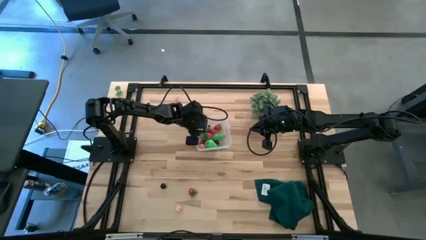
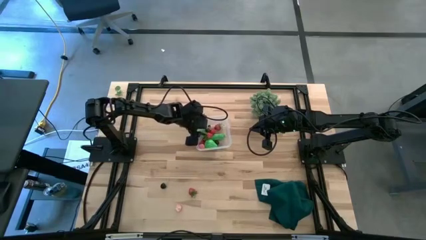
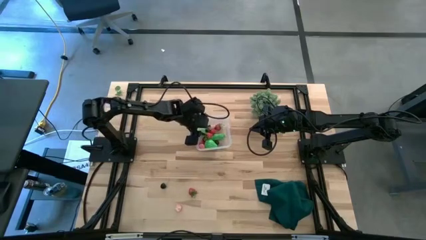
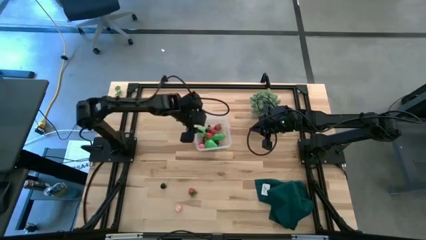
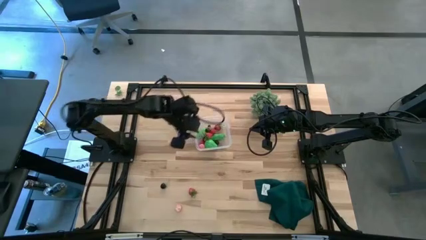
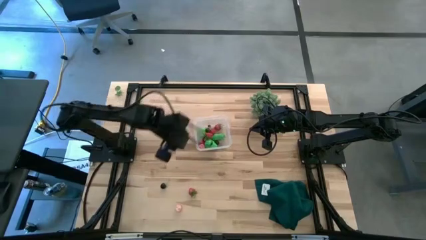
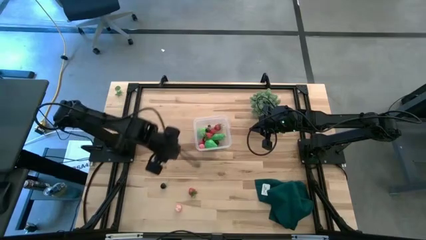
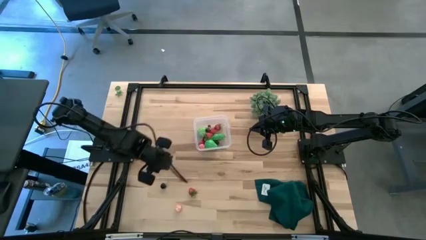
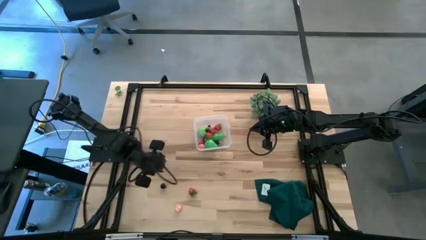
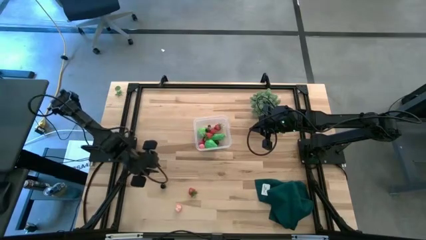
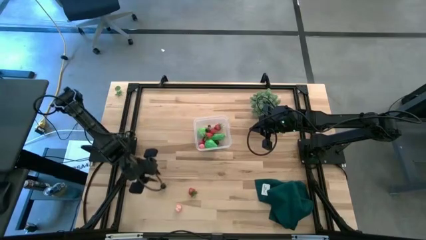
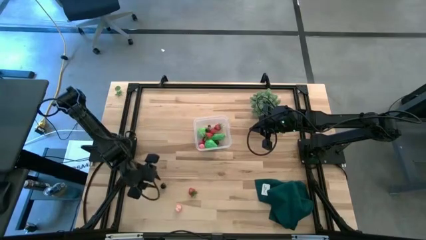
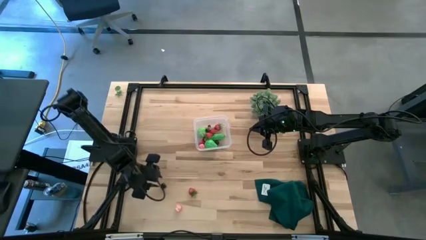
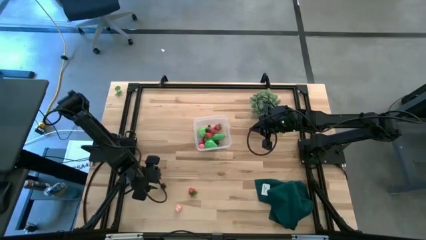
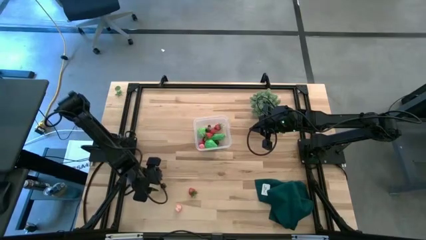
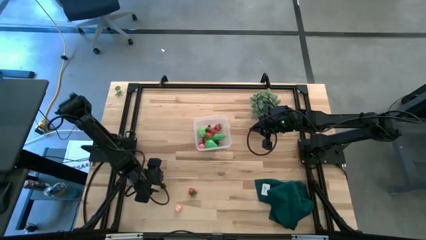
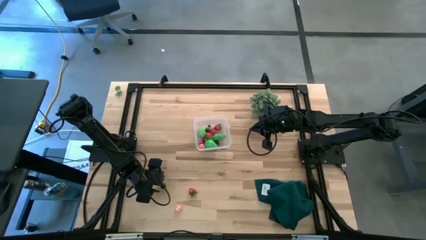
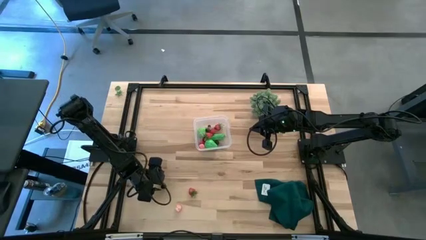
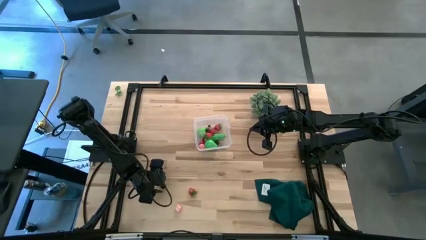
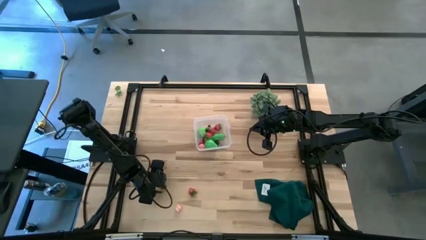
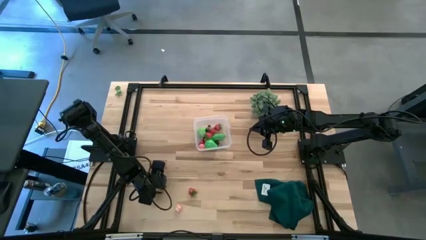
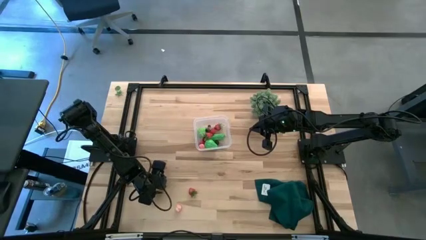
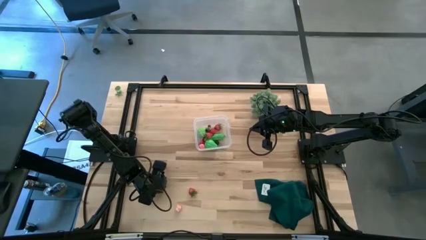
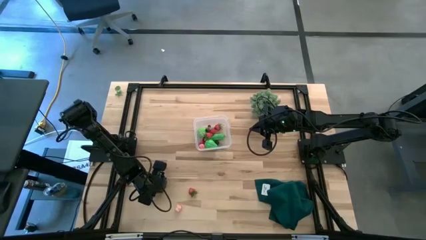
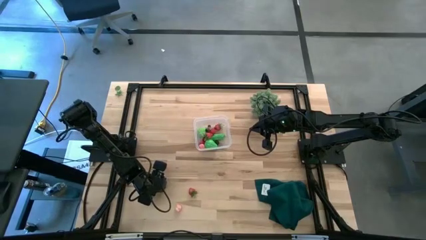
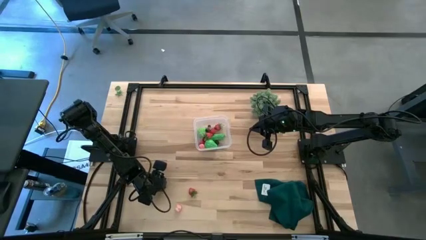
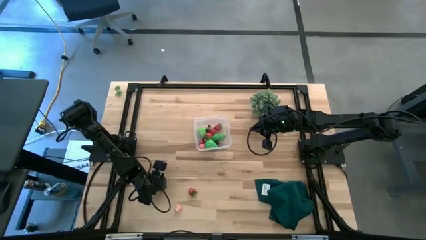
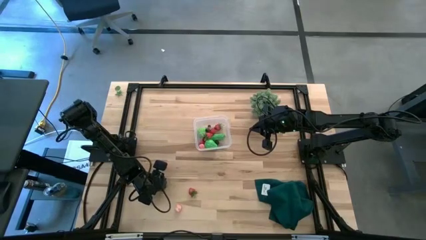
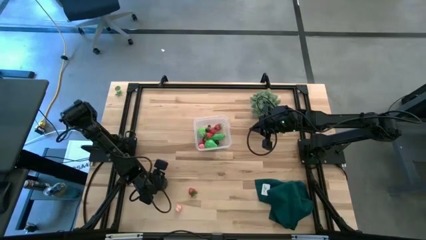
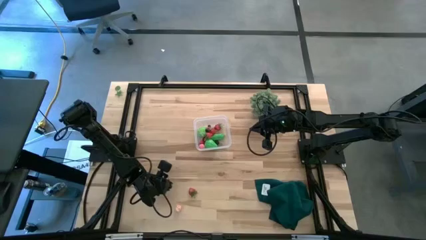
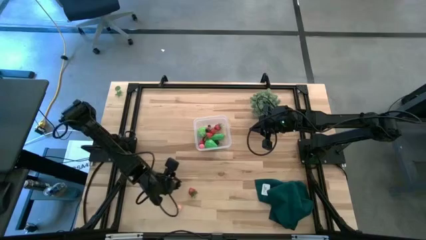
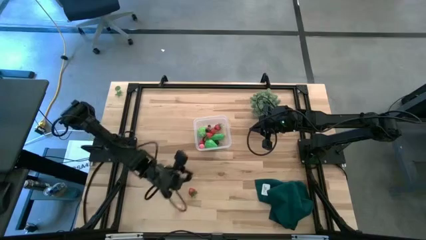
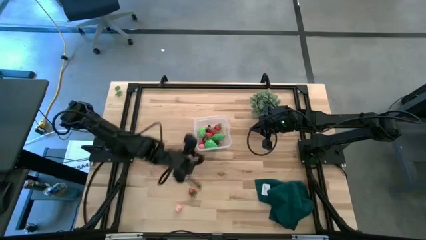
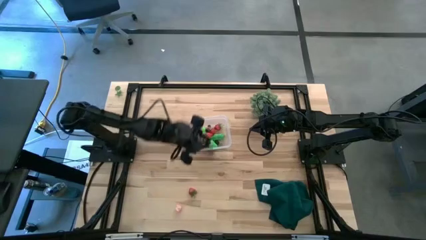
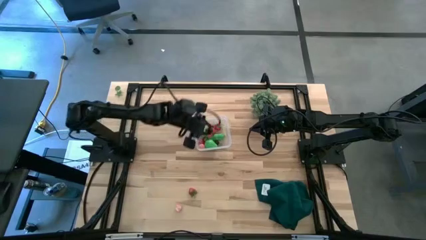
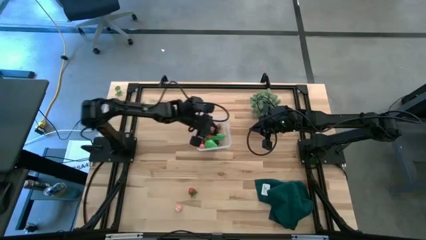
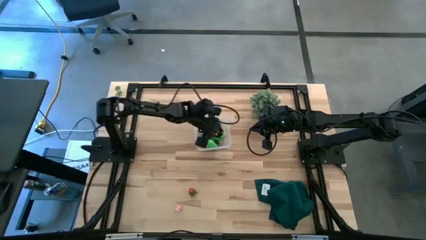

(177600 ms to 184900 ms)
Task: Pick and placing Produce into tupperware
Put the black cherry into the transparent bin

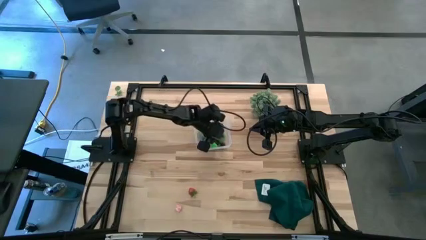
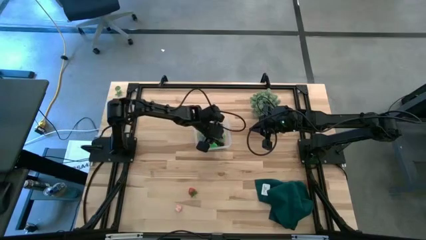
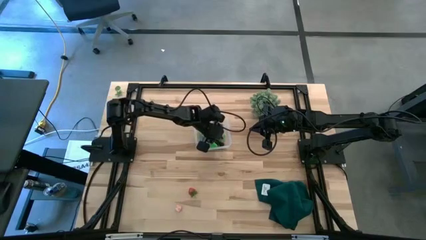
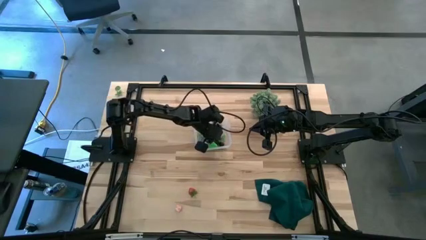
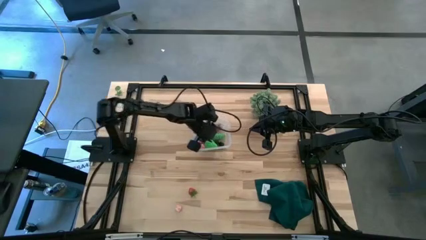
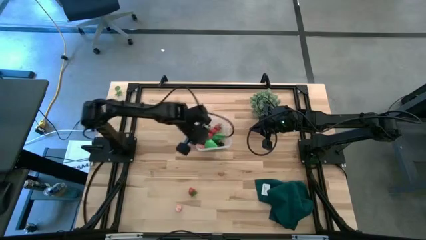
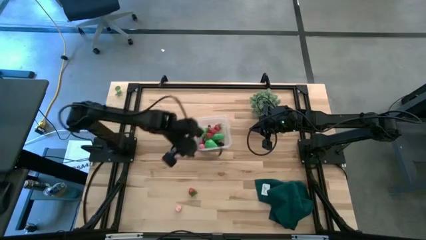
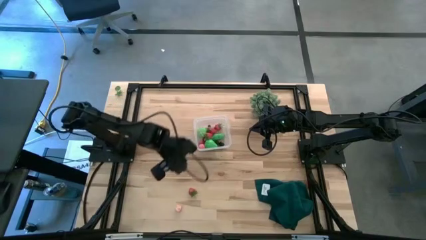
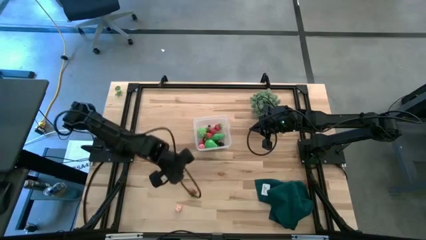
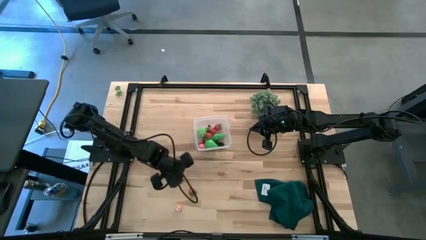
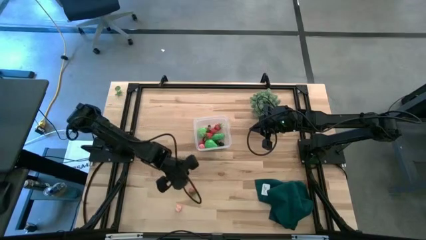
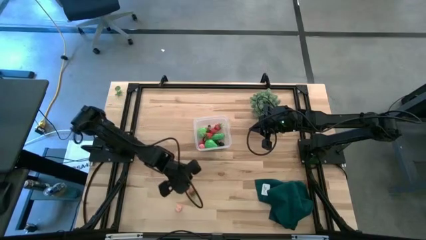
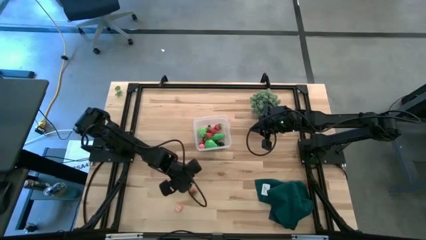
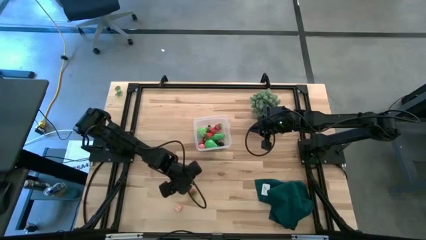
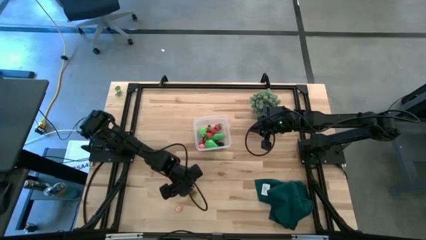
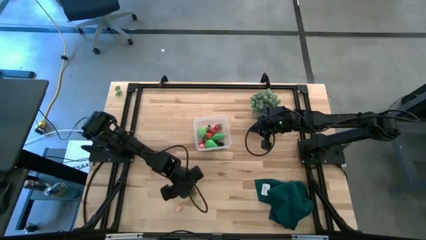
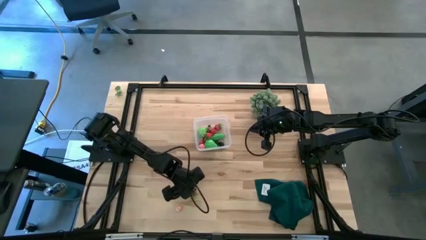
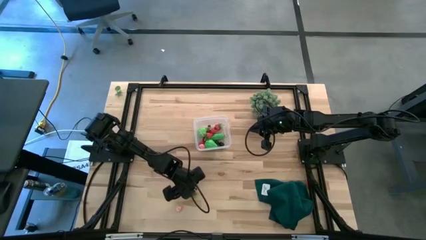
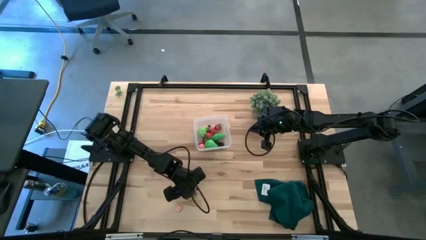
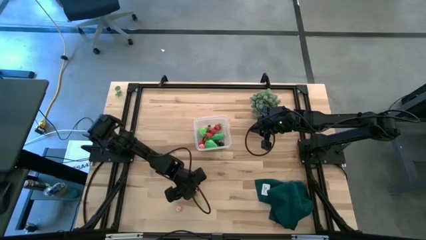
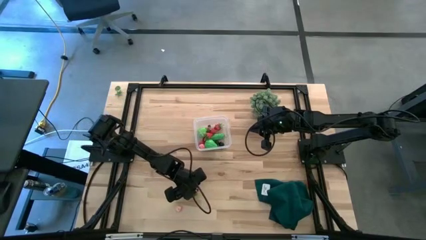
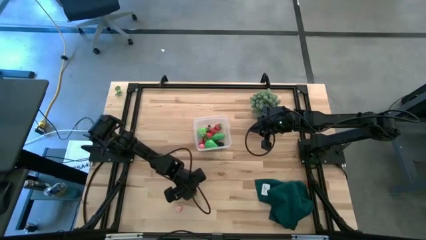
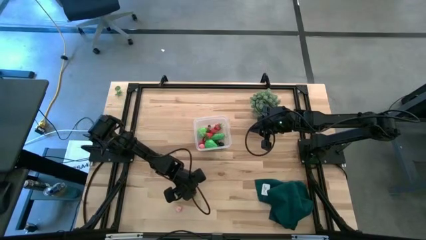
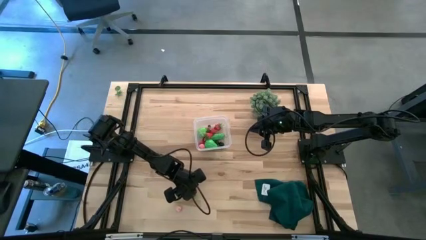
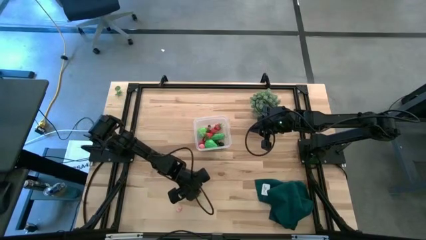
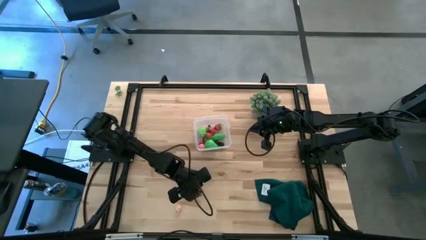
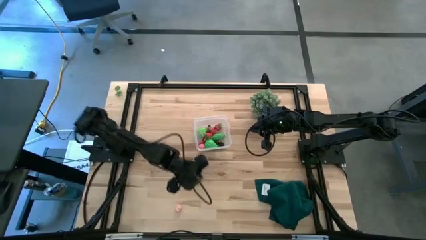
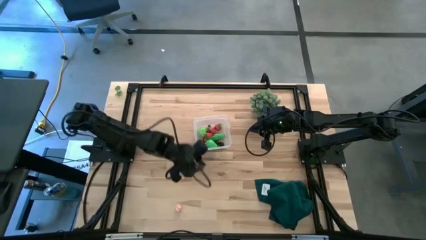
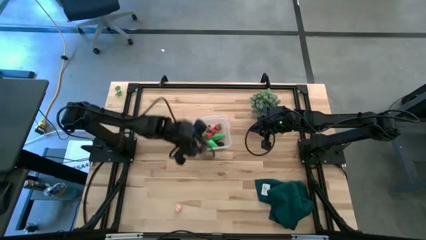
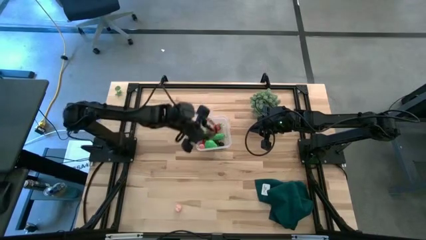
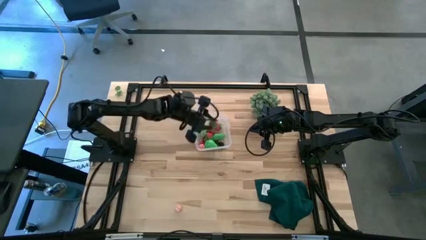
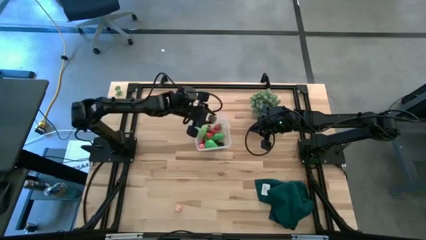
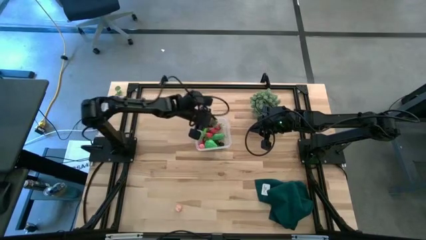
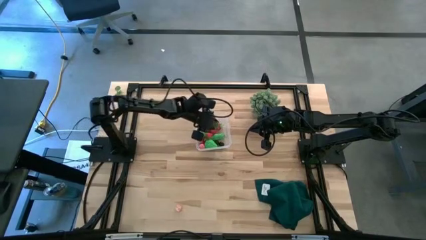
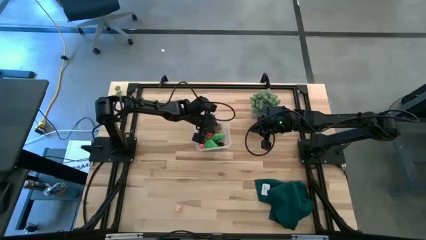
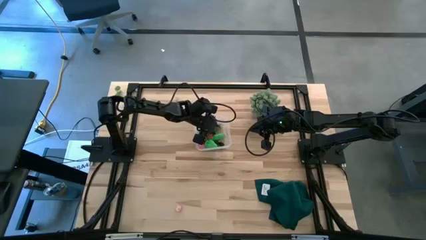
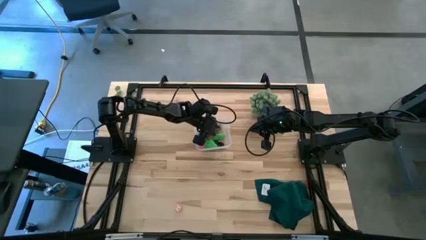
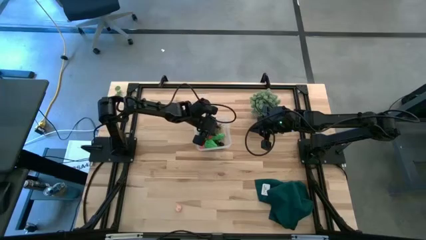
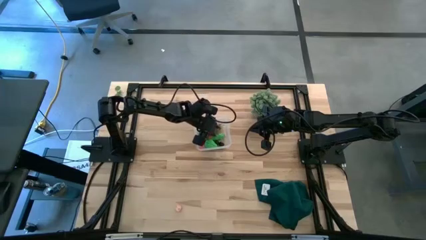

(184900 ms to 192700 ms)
Put the strawberry into the transparent bin

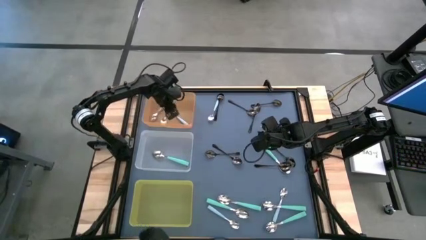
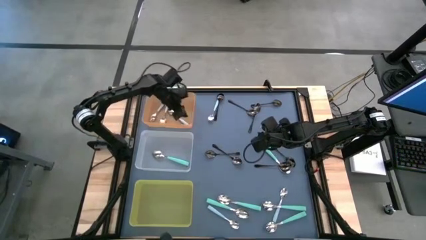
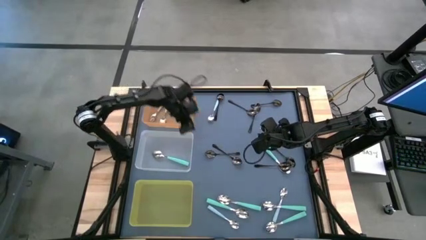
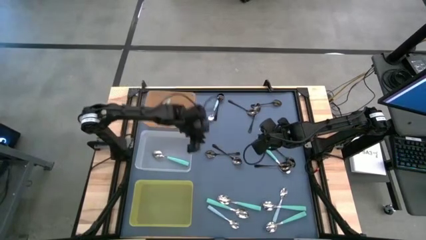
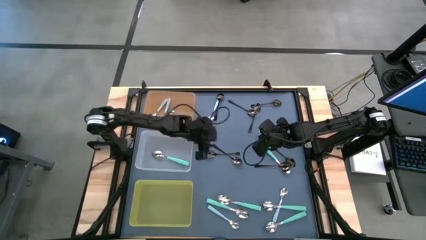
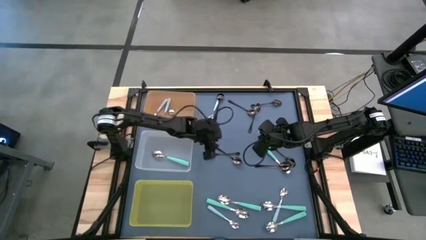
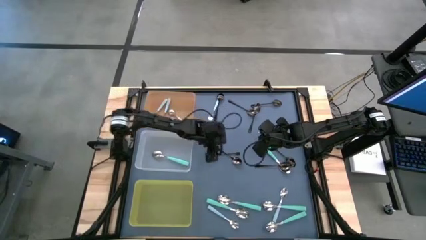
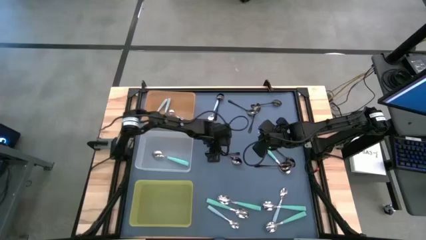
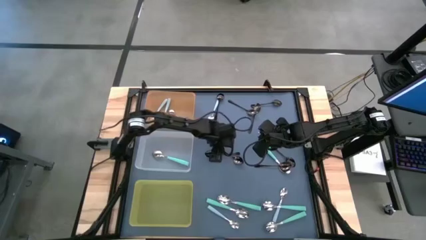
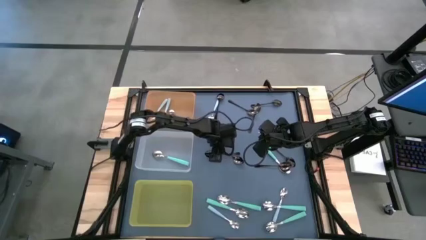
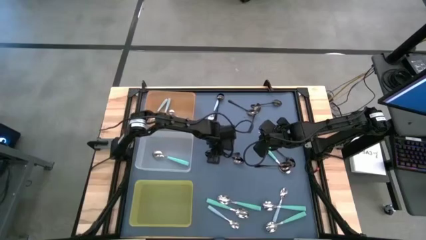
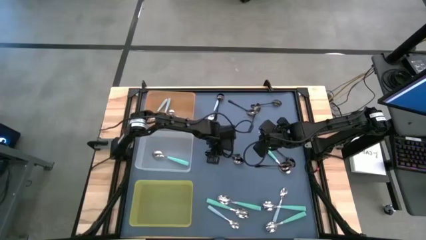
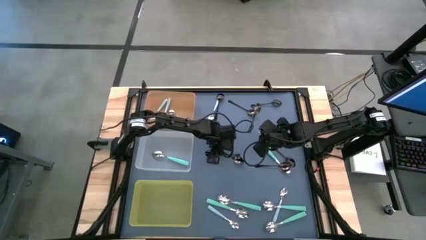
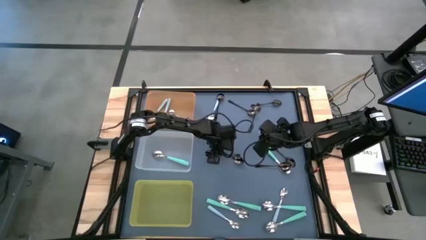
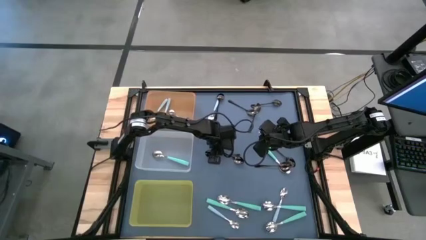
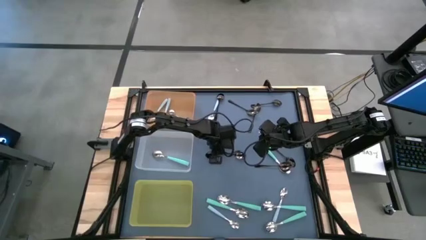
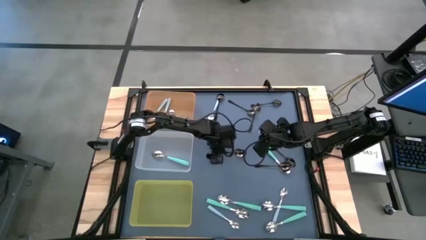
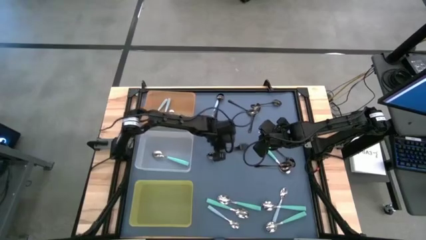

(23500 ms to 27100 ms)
Task: Sort silverware by color (type)
Put the black spoon into the yellow bin
